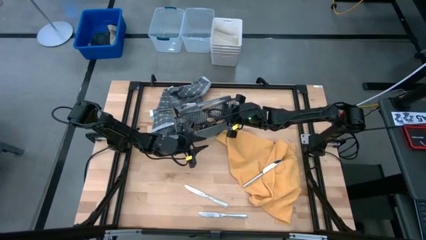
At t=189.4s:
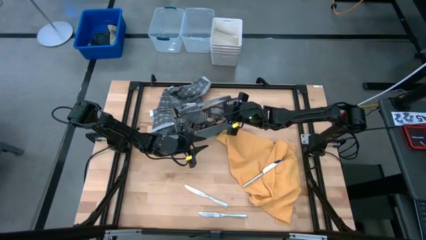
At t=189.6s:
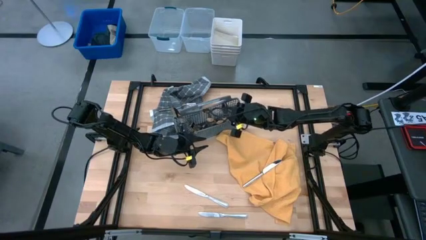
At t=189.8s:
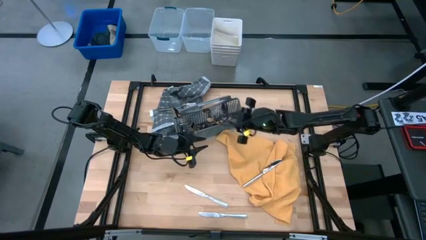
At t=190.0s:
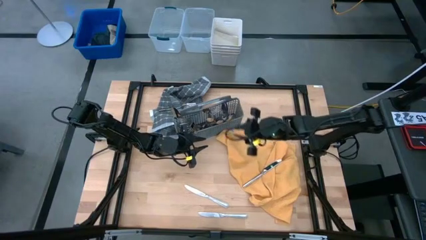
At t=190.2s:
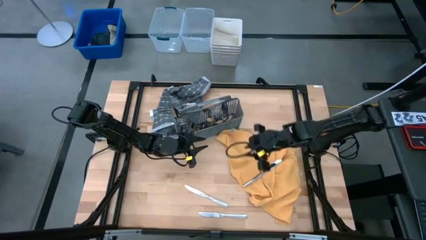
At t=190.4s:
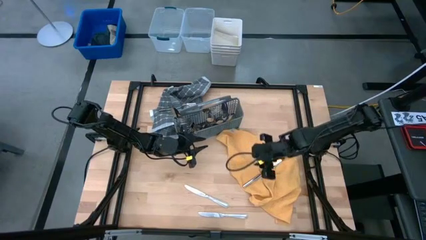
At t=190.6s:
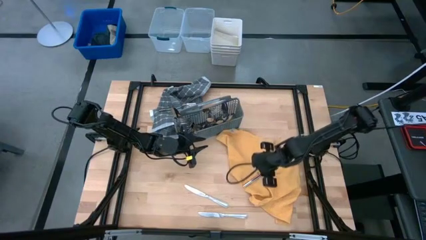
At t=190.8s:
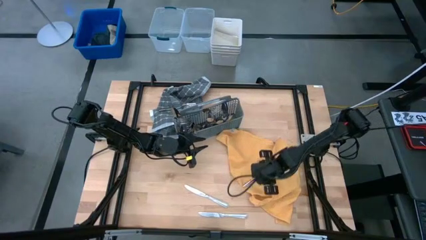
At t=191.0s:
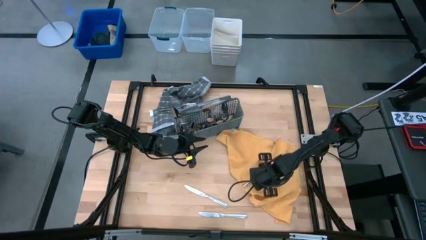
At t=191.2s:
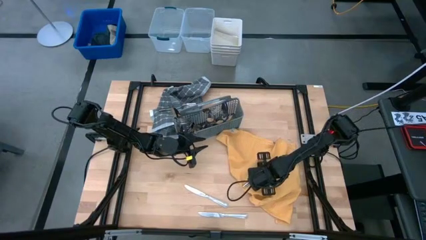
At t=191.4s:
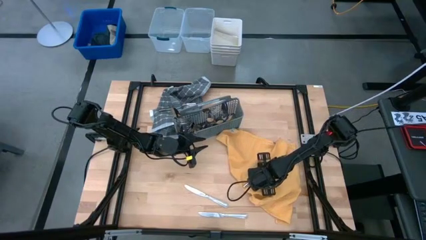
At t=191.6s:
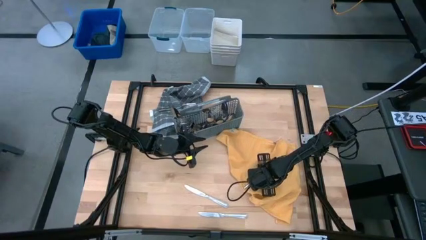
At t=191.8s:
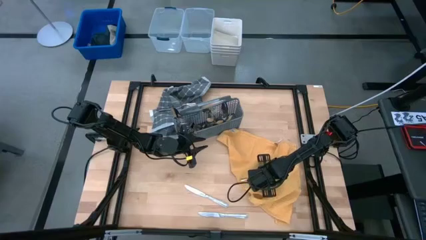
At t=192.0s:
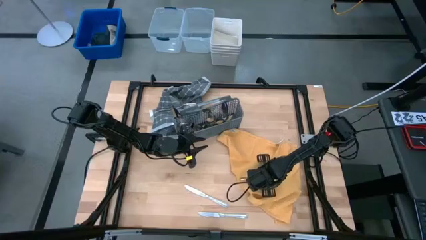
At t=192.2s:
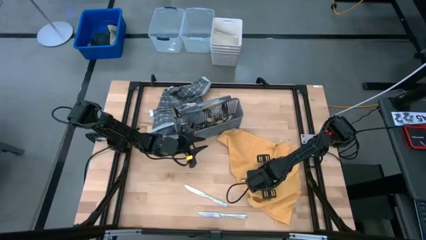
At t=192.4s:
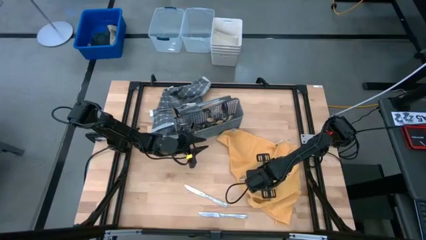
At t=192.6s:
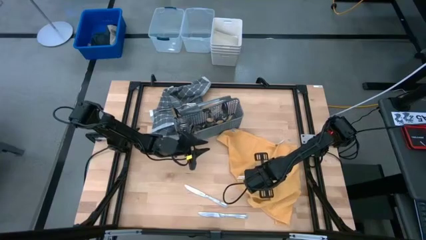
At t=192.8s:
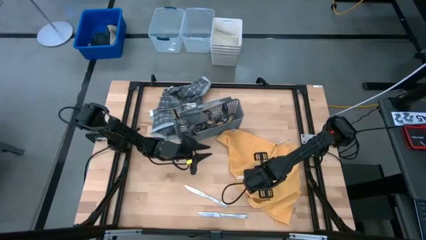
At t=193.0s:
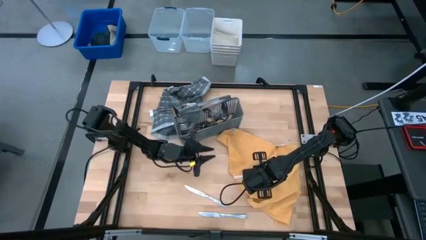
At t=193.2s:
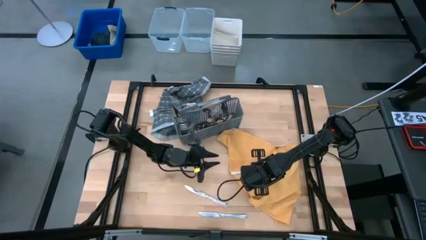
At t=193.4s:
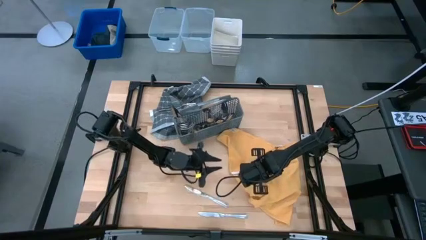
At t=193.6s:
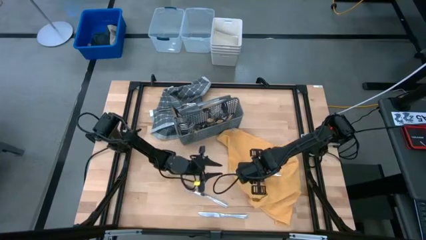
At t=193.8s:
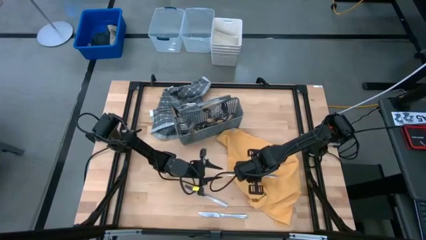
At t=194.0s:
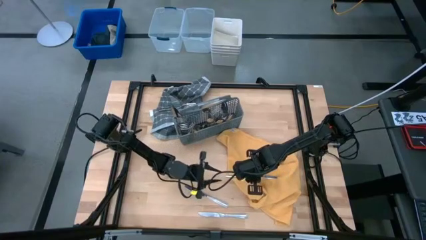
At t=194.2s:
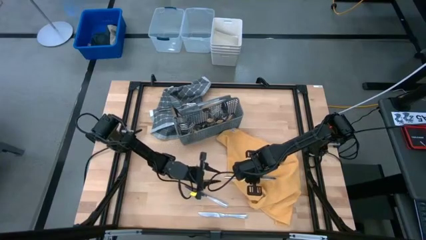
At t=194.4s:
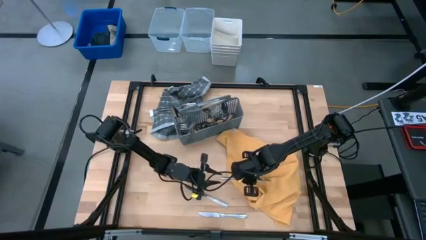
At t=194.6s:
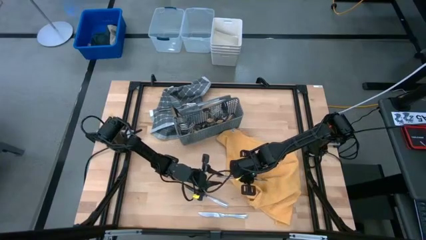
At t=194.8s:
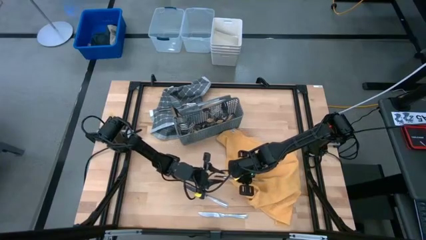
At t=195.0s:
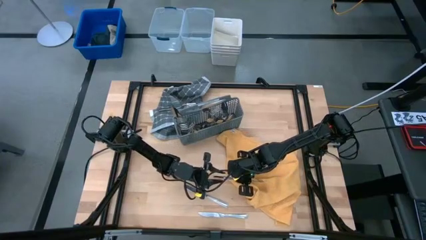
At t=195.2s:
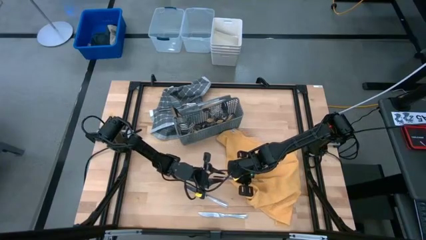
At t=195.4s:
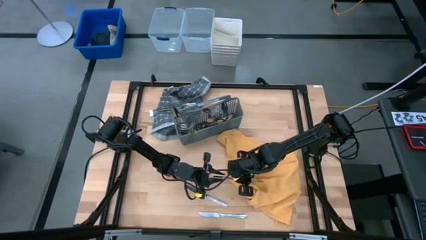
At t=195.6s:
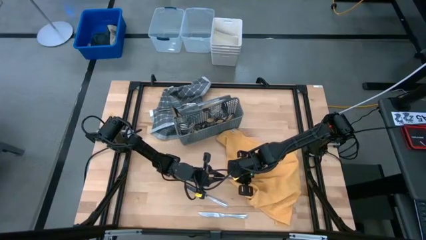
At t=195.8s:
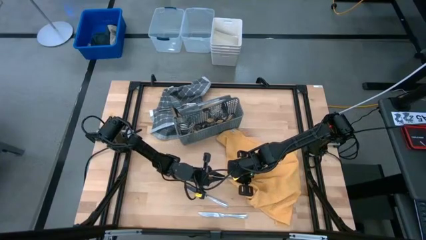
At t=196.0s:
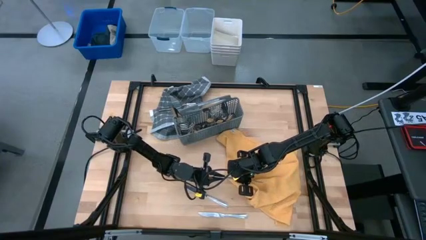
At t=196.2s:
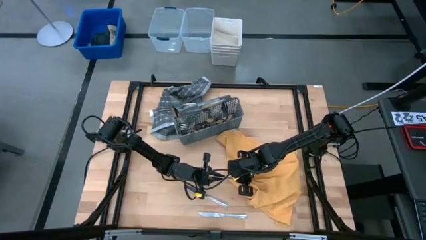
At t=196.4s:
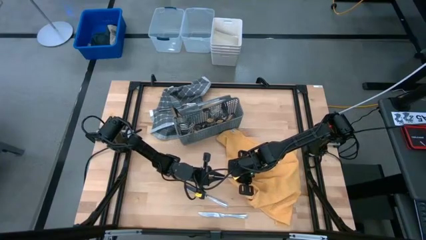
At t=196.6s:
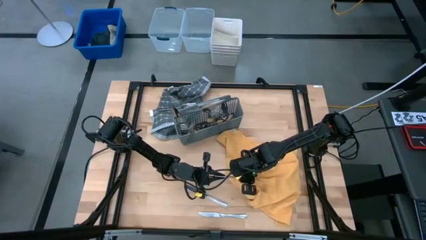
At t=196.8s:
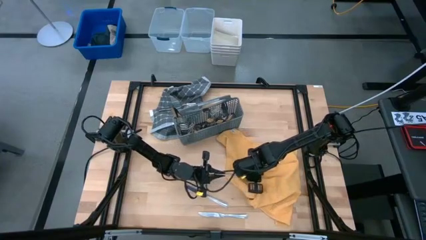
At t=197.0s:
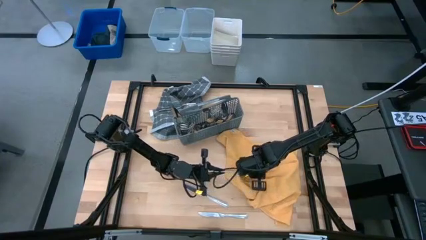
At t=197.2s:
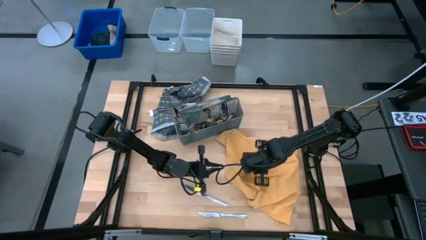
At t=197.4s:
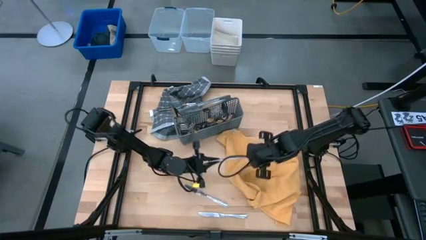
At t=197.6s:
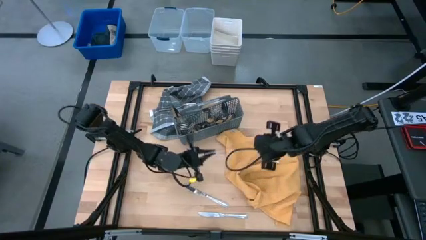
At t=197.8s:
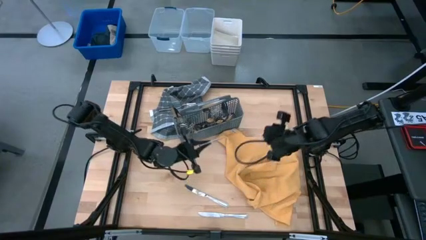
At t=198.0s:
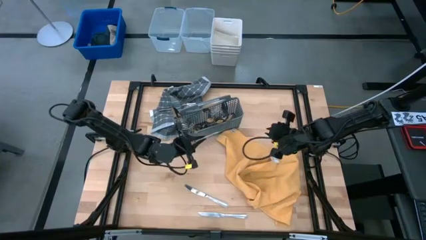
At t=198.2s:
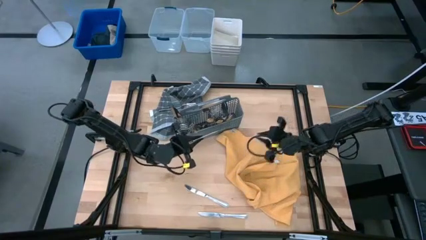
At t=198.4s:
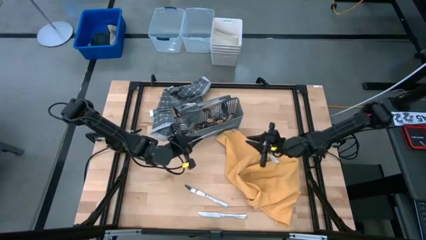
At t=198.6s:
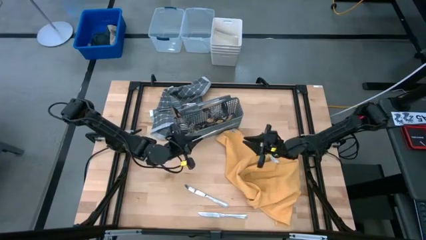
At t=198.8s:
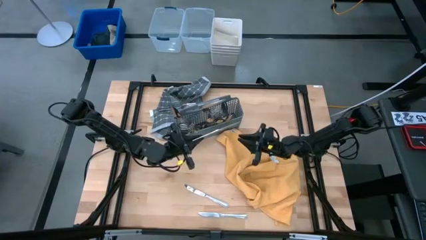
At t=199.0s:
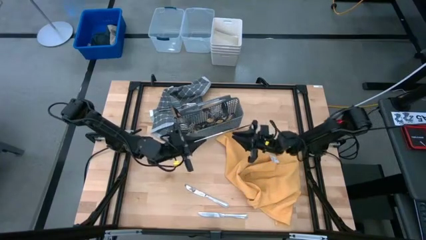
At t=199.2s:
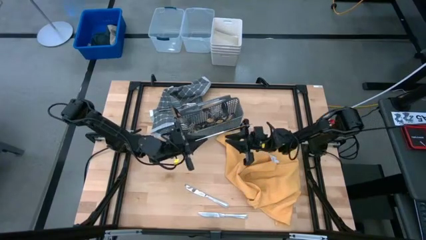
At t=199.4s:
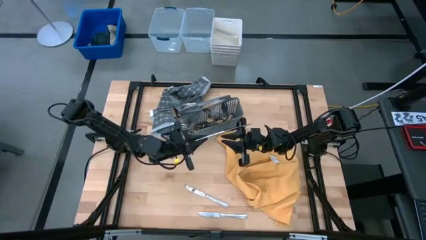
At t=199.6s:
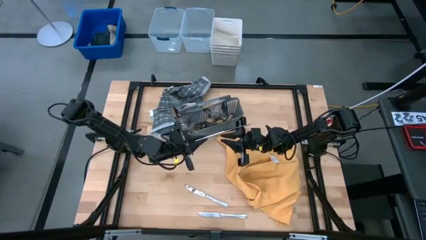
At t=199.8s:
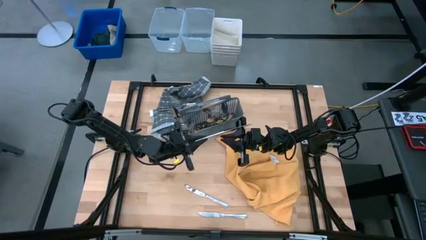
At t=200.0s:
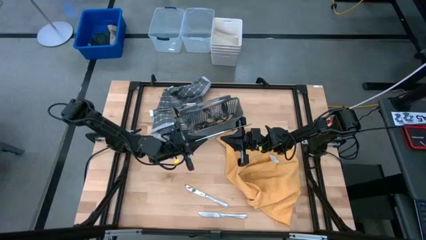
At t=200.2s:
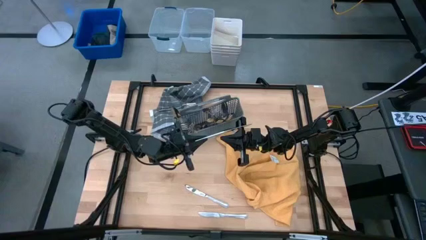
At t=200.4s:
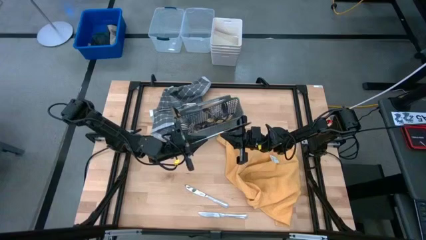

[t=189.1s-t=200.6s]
Task: Sort silverware
Put the silver knife into the gray silverware basket
